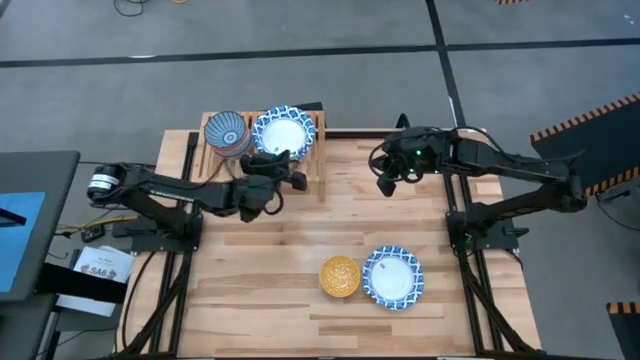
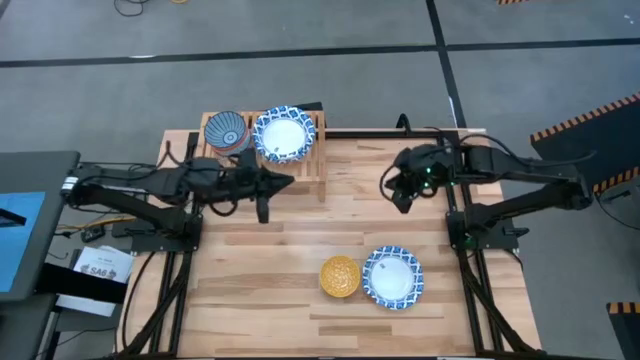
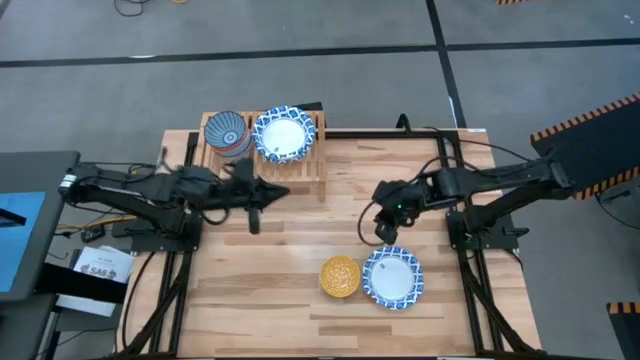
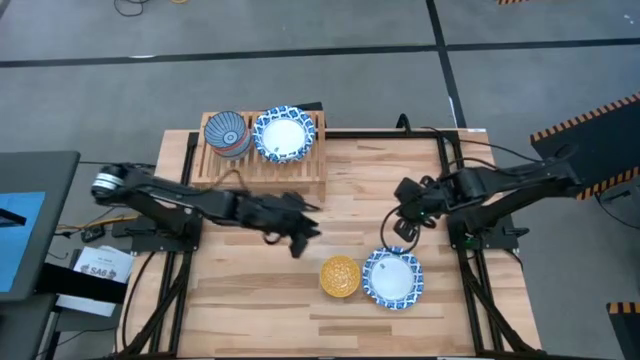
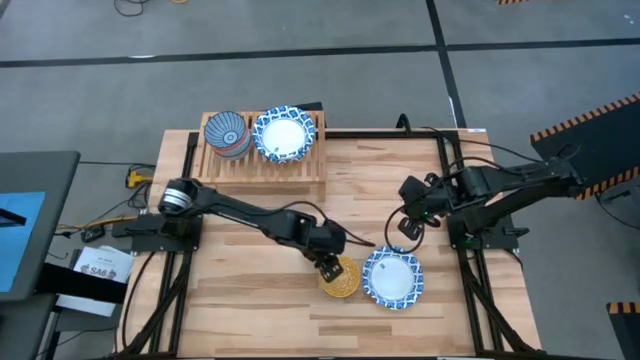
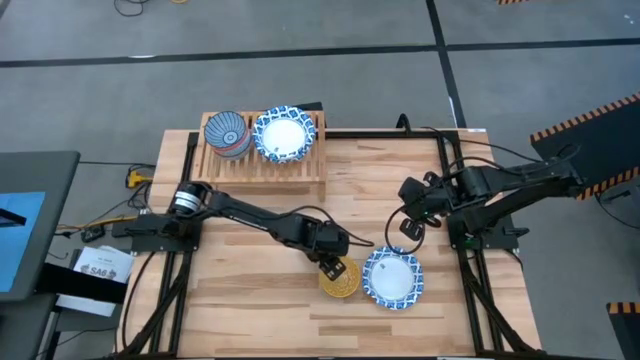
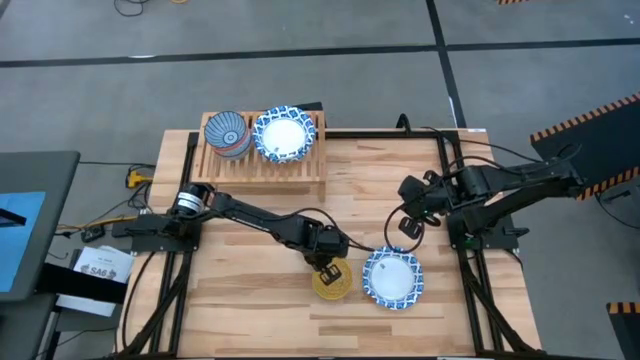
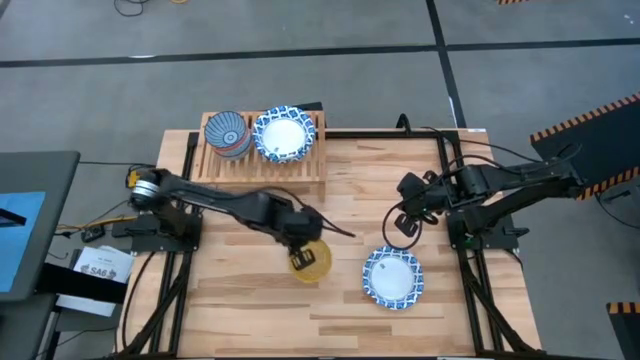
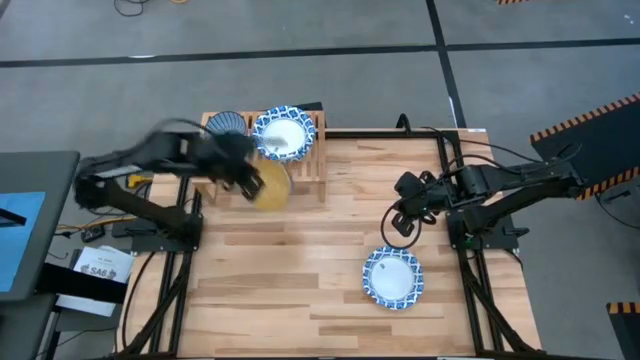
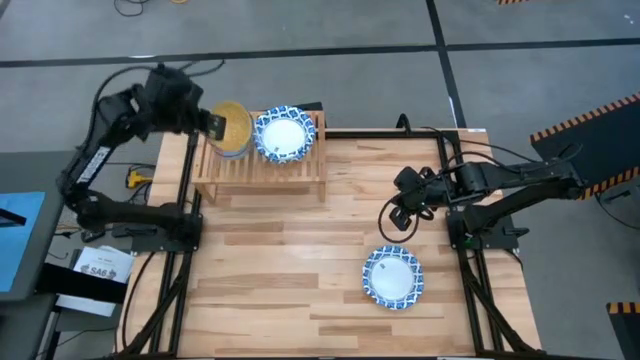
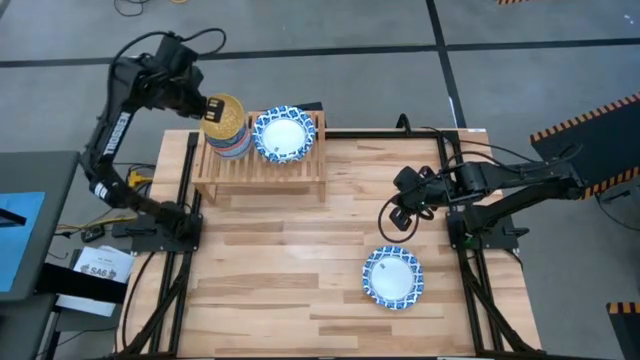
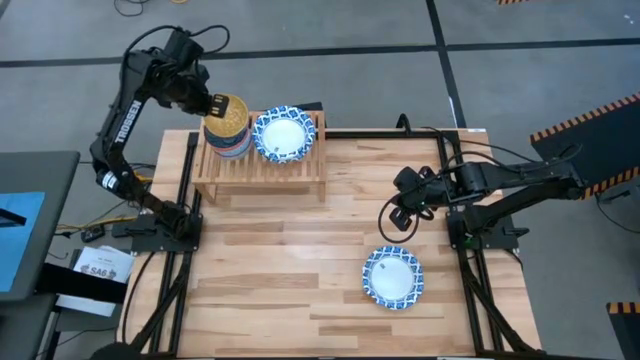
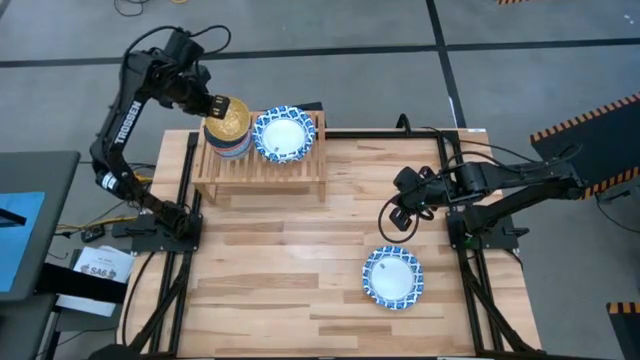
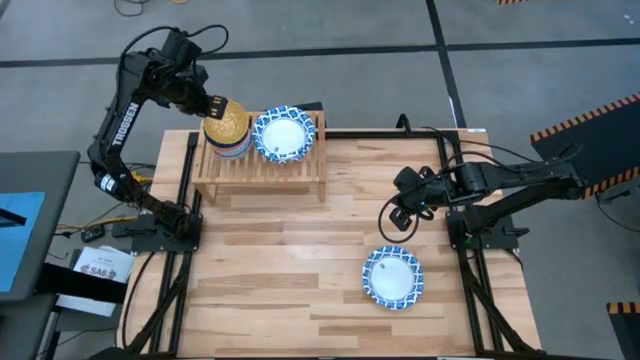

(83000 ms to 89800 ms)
Task: Place and stack bowls onto a shelf
Stack the small yellow bowl on top of the small blue bowl on the shelf

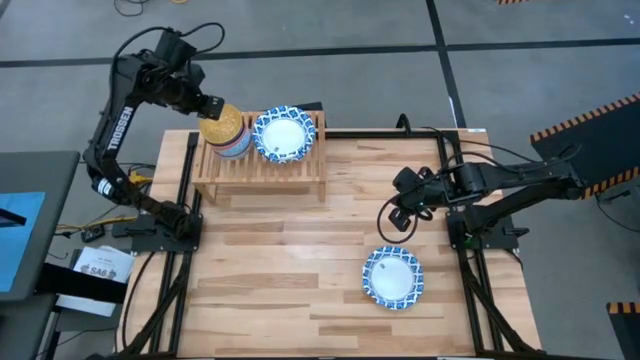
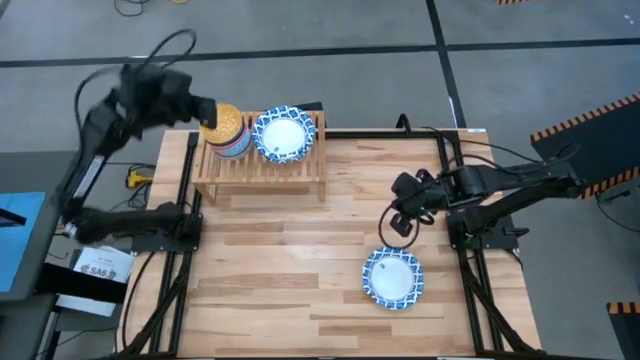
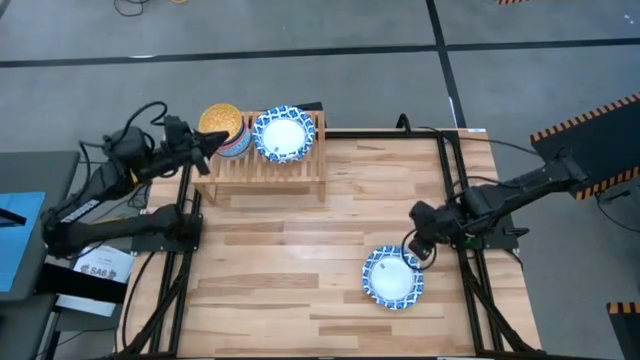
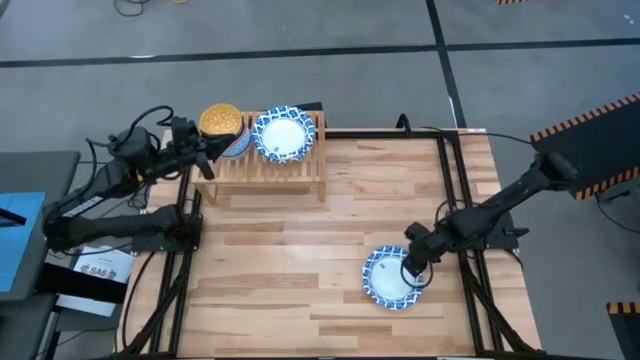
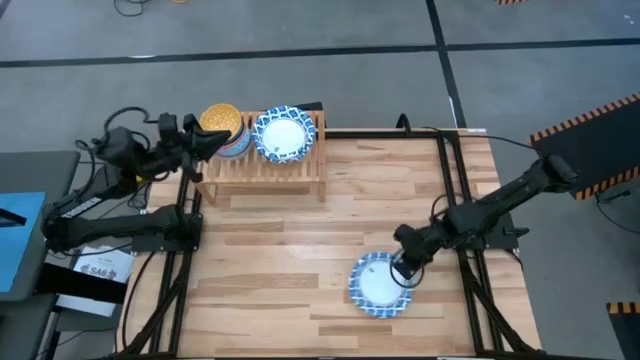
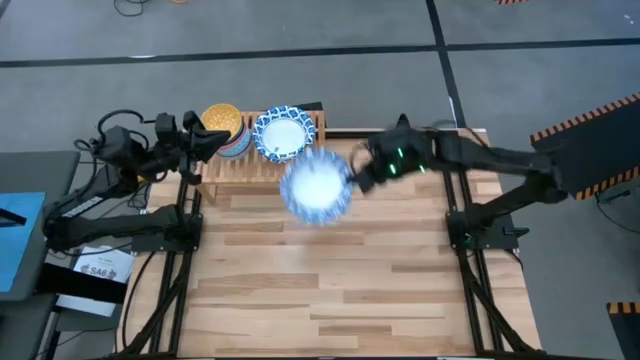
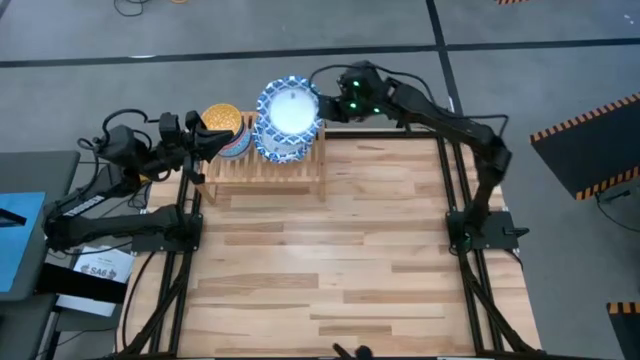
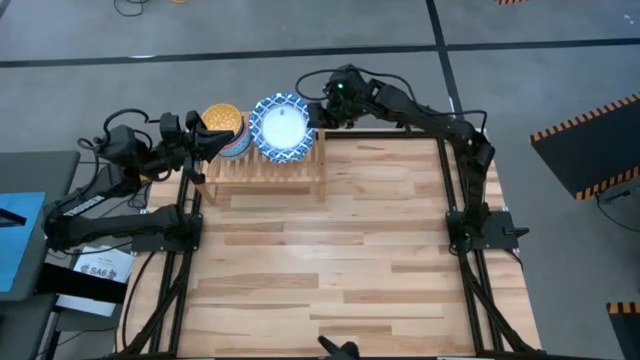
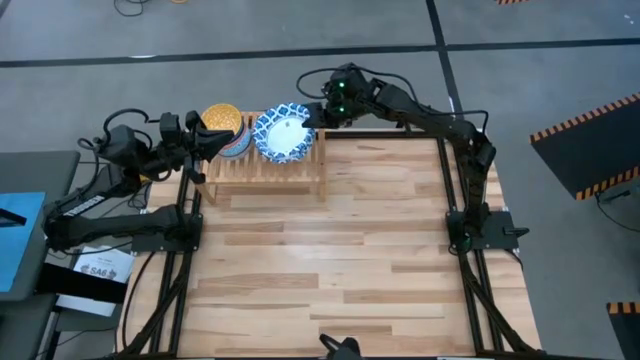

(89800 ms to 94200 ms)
Stack the large white bowl on top of the white bowl on the shelf

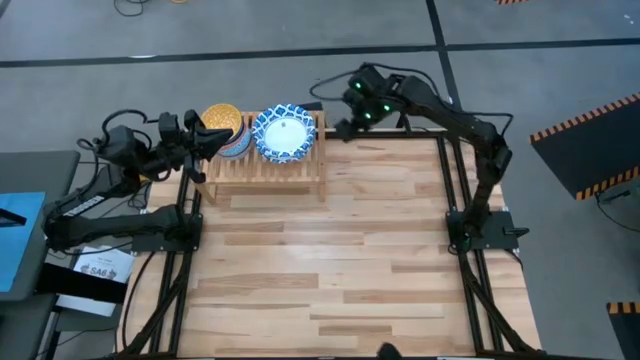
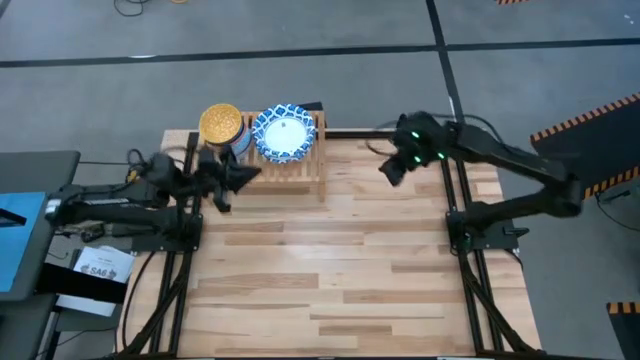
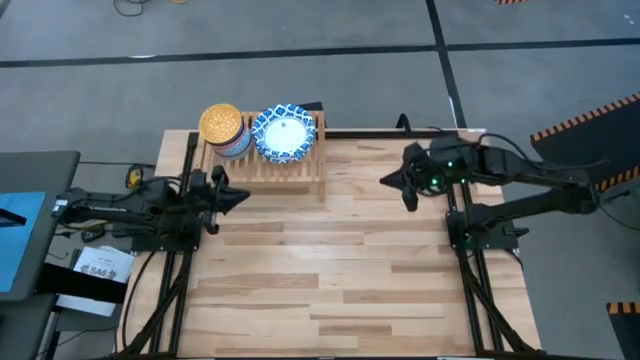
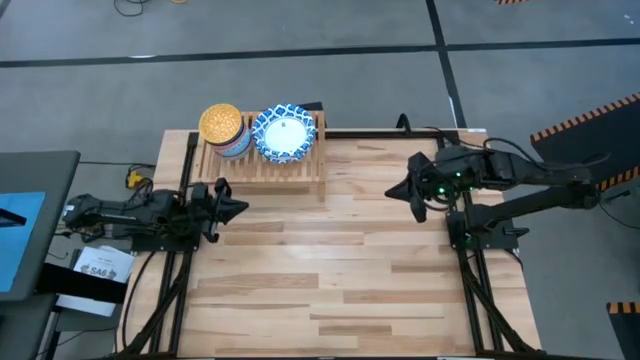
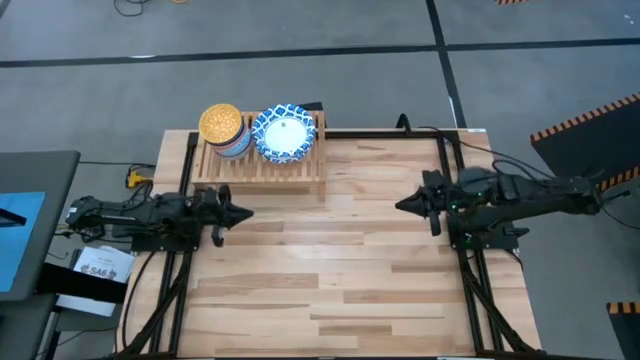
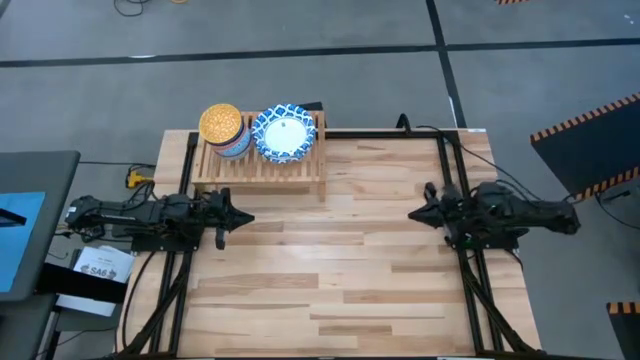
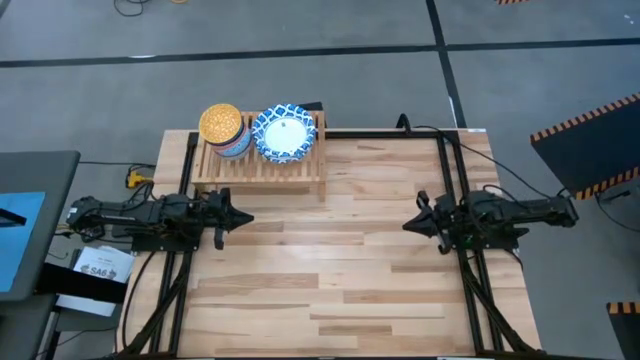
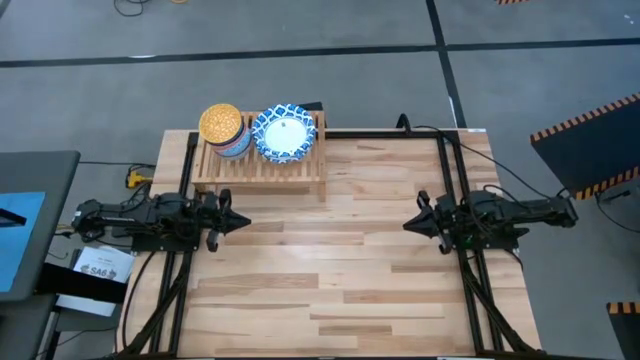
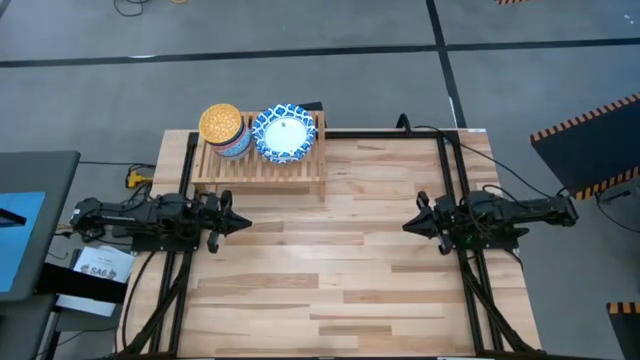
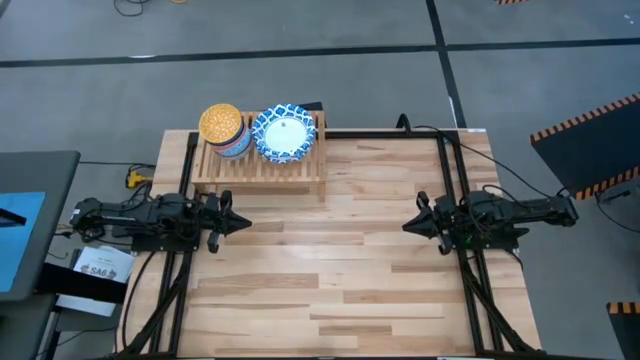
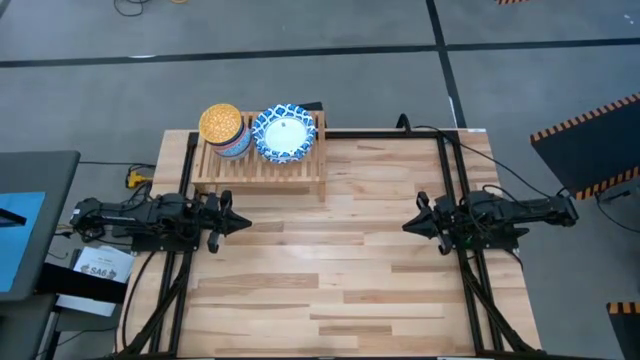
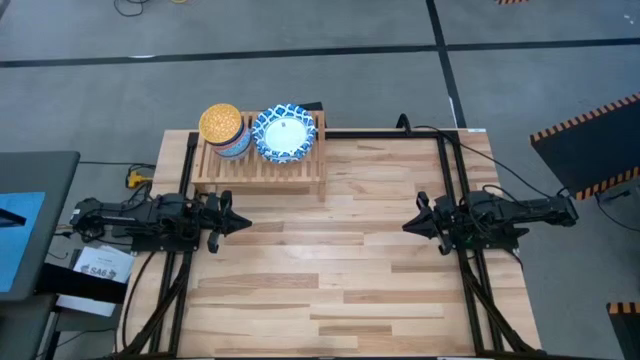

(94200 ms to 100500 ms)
Return to Home Position

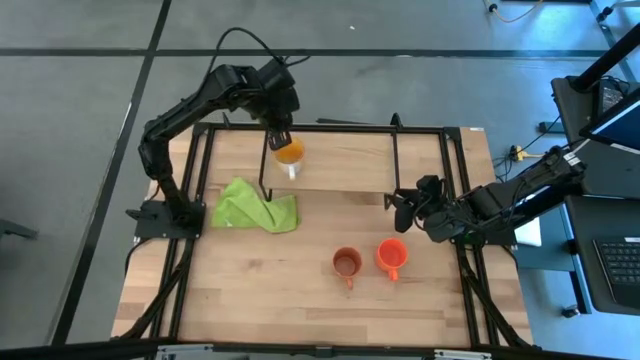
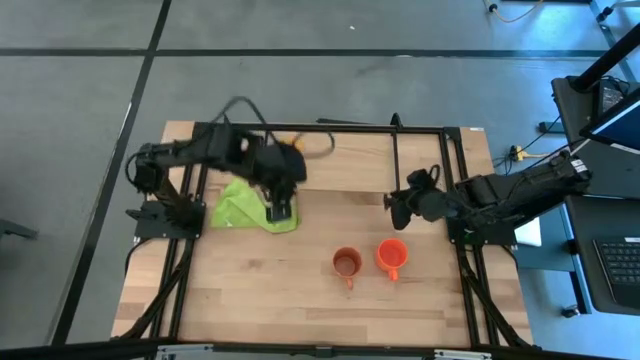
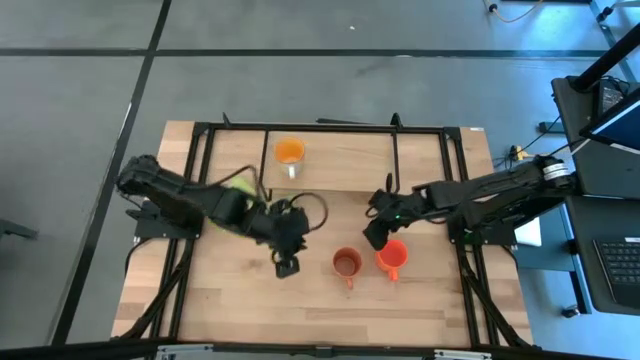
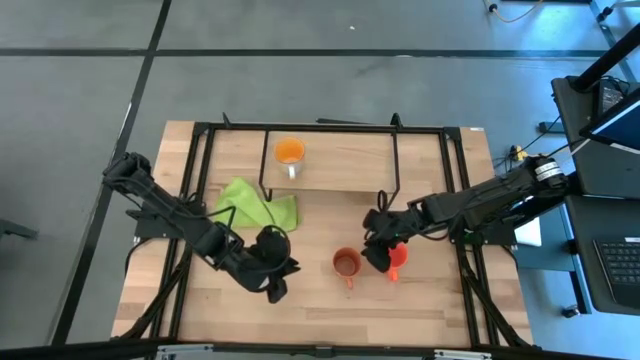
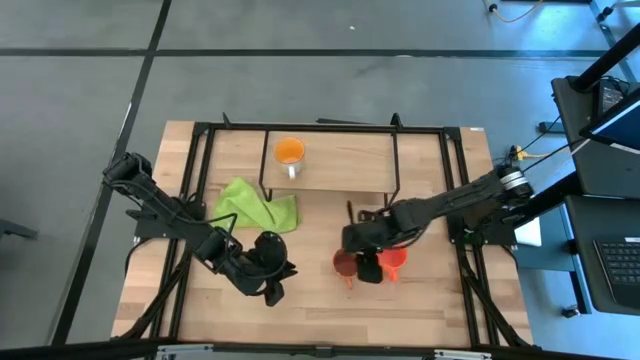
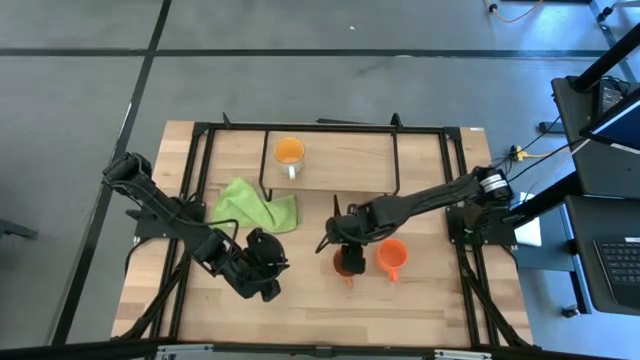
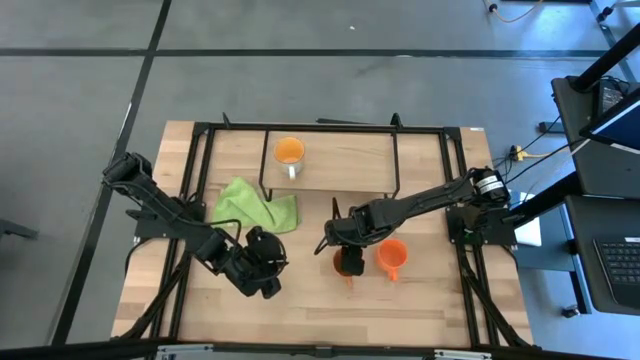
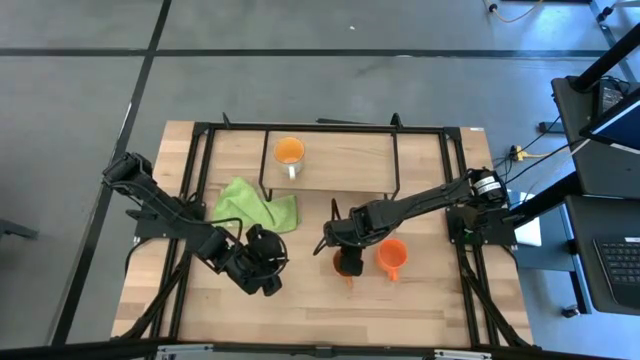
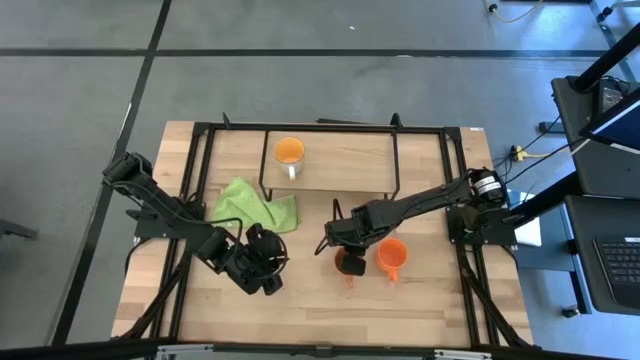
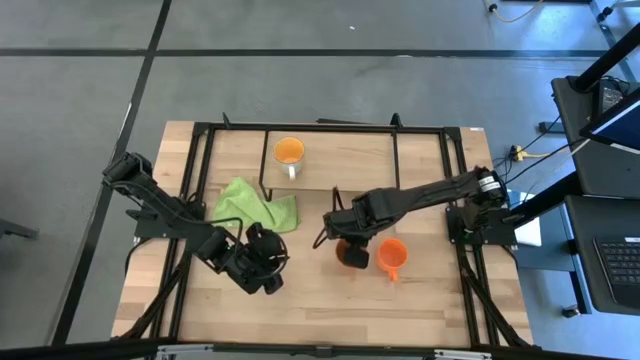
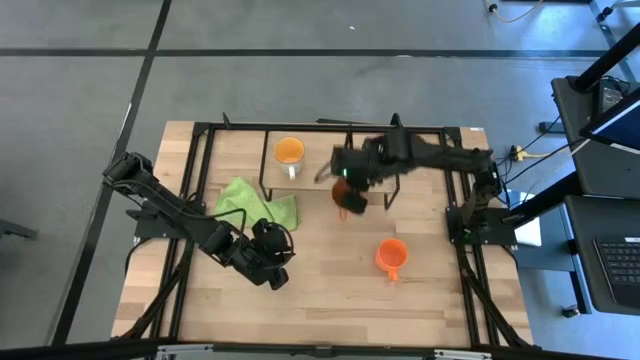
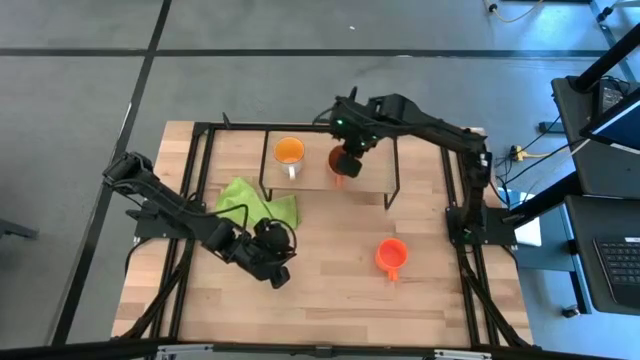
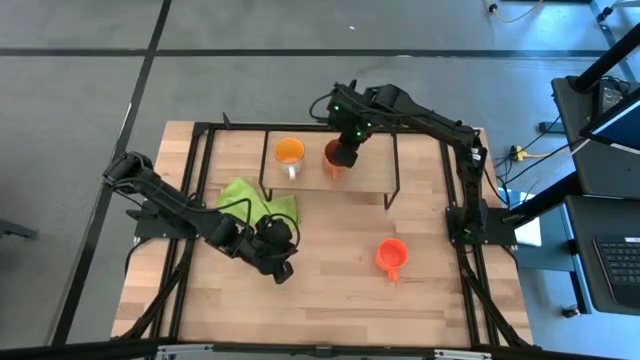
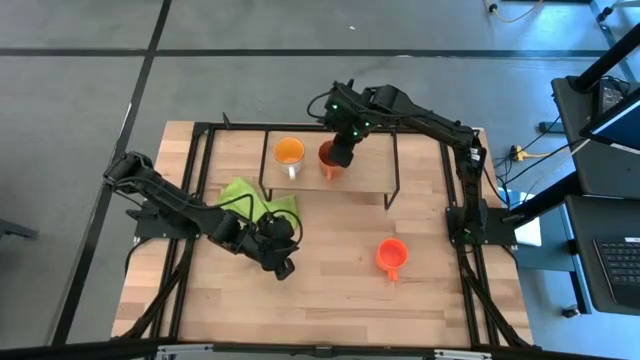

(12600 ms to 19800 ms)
Task: Stack small to large cups/mugs on shelf
Put the dark orange mug on the shelf
